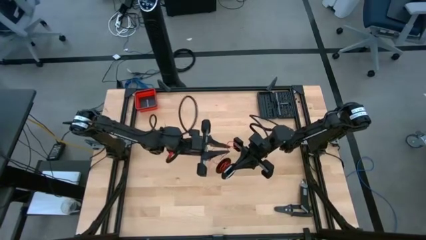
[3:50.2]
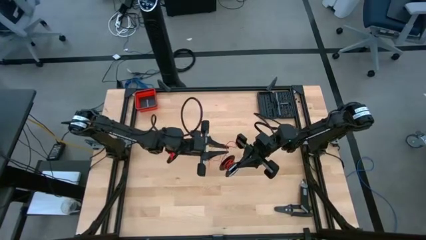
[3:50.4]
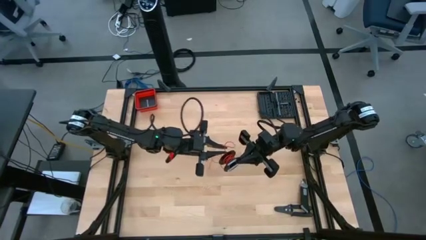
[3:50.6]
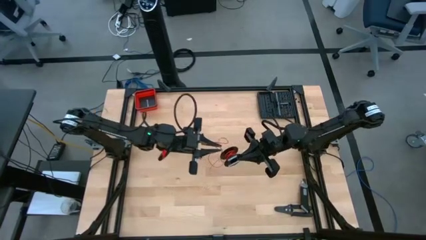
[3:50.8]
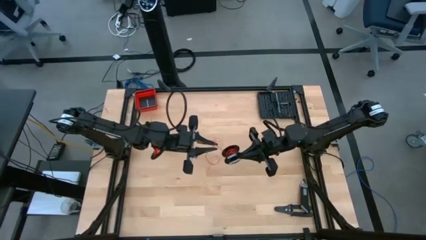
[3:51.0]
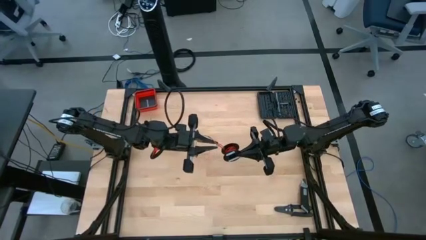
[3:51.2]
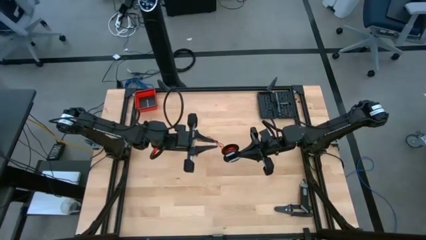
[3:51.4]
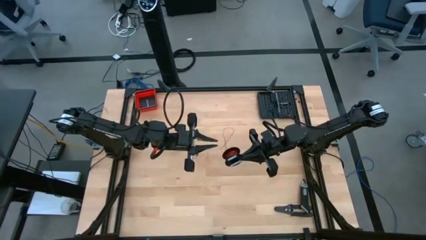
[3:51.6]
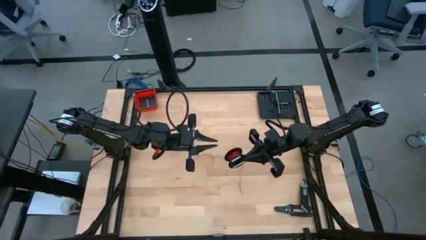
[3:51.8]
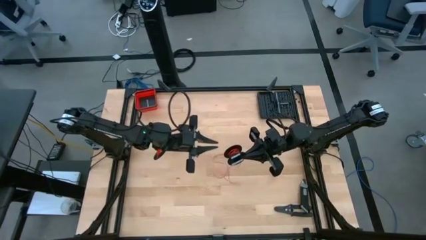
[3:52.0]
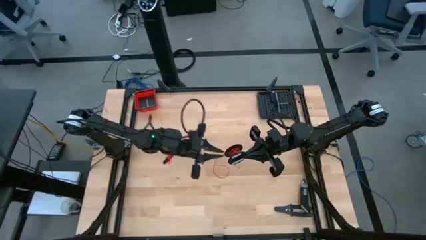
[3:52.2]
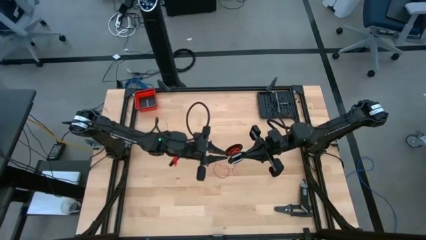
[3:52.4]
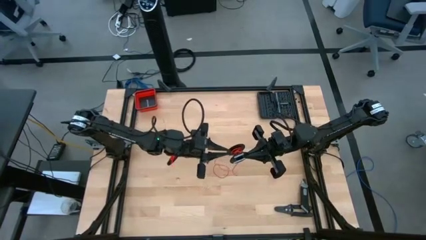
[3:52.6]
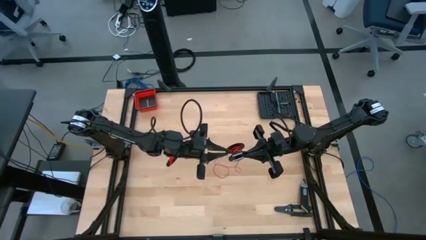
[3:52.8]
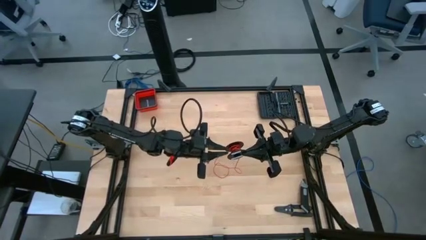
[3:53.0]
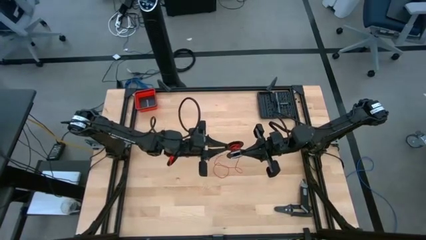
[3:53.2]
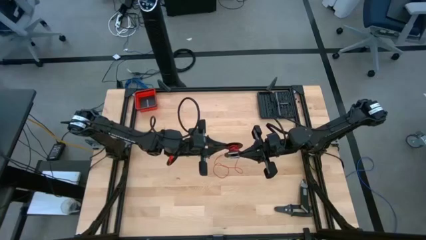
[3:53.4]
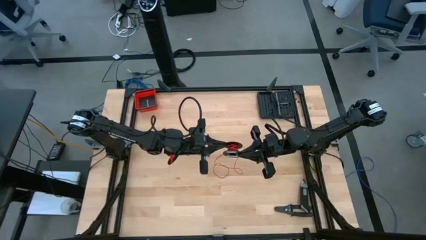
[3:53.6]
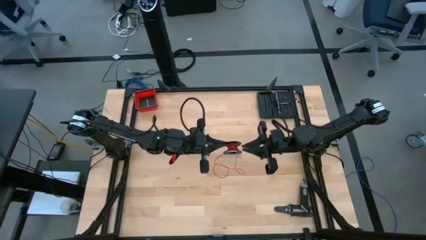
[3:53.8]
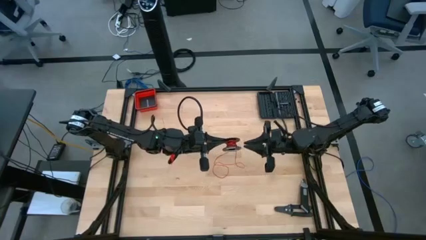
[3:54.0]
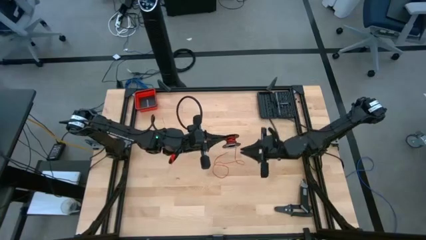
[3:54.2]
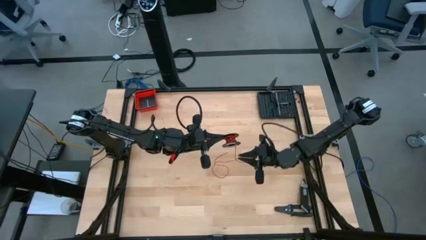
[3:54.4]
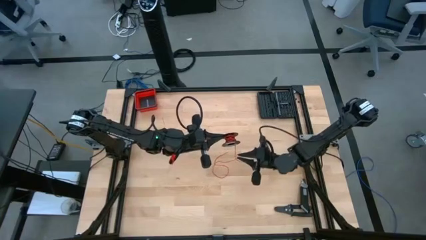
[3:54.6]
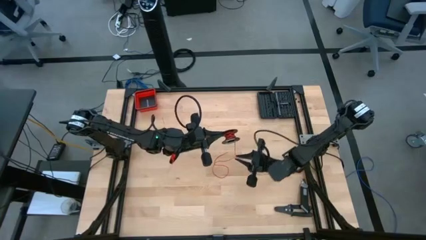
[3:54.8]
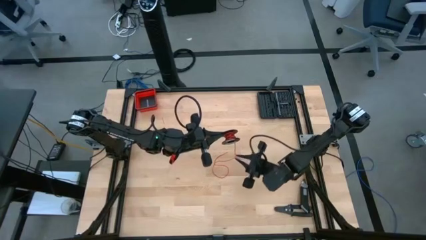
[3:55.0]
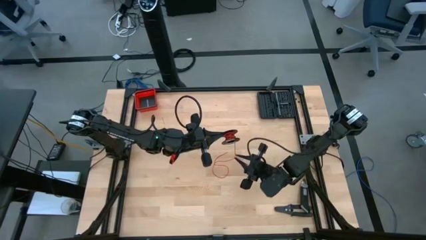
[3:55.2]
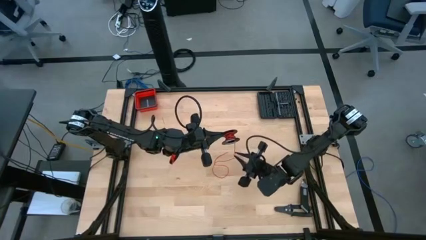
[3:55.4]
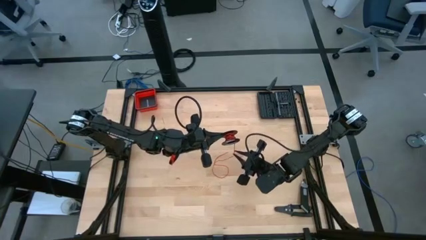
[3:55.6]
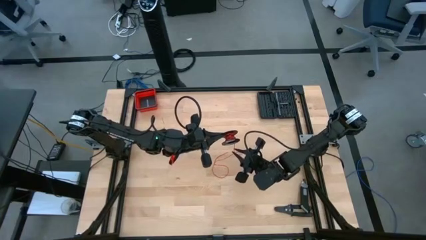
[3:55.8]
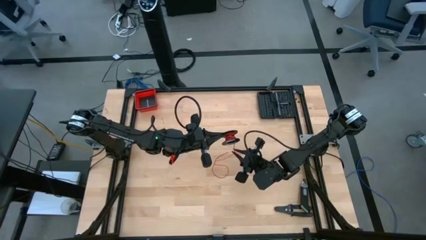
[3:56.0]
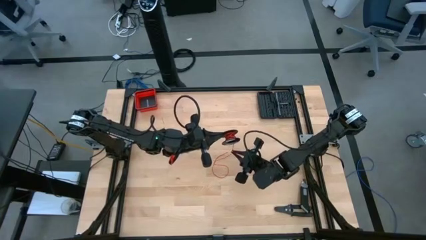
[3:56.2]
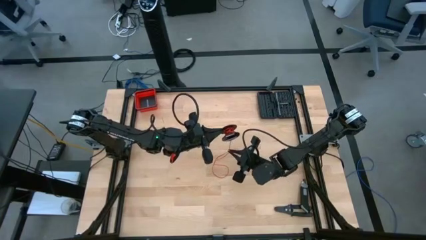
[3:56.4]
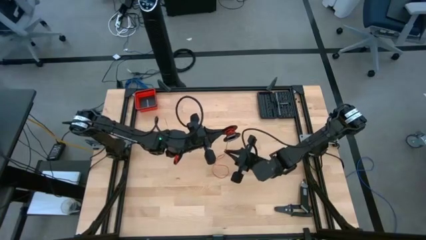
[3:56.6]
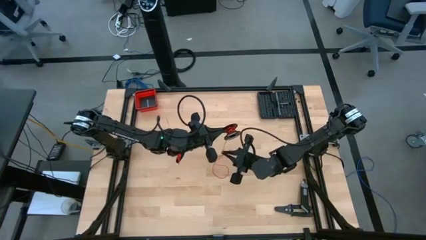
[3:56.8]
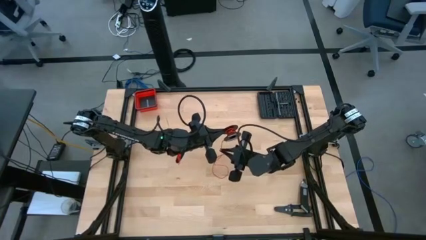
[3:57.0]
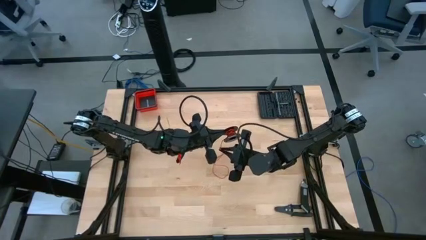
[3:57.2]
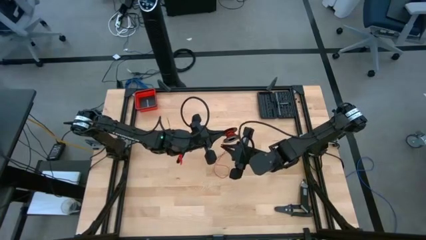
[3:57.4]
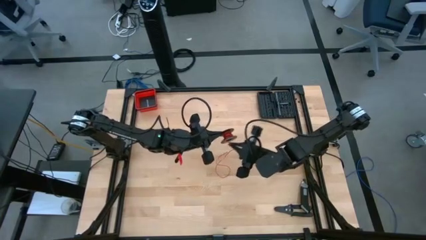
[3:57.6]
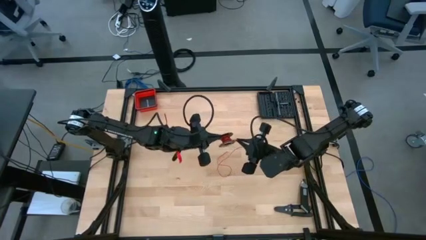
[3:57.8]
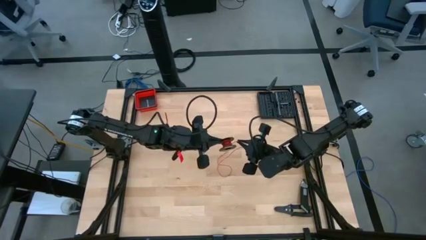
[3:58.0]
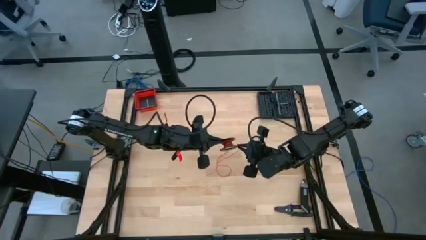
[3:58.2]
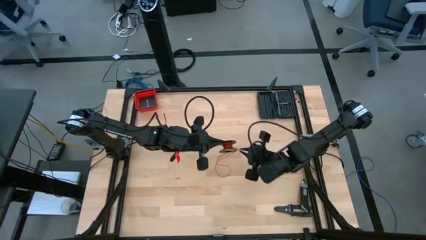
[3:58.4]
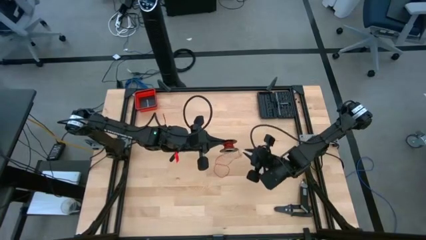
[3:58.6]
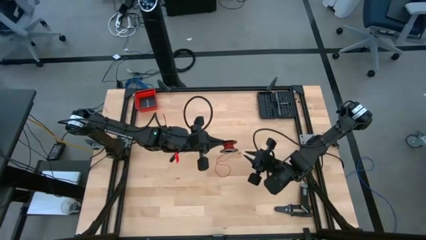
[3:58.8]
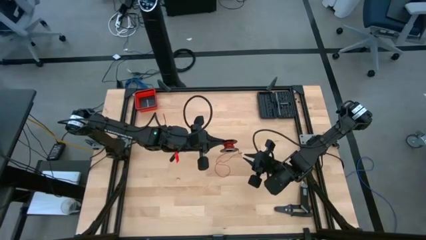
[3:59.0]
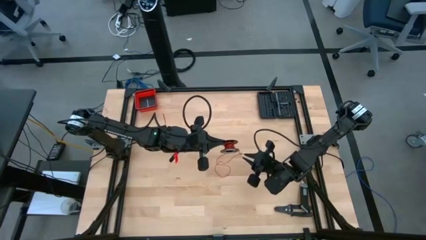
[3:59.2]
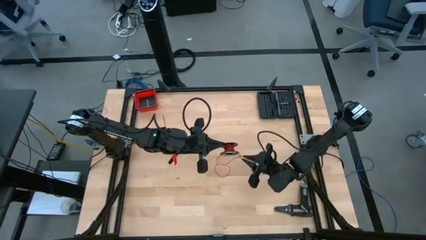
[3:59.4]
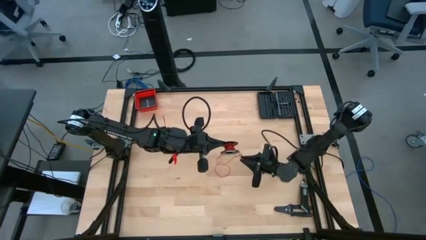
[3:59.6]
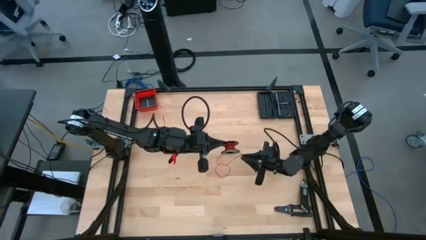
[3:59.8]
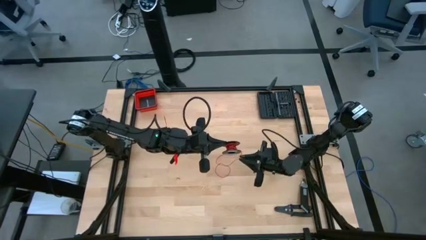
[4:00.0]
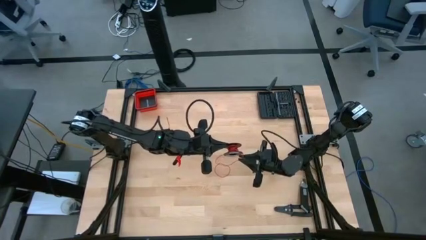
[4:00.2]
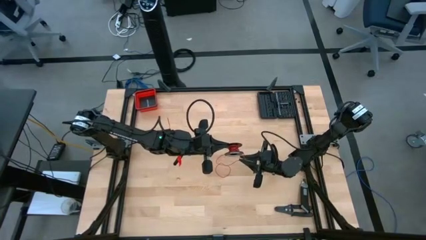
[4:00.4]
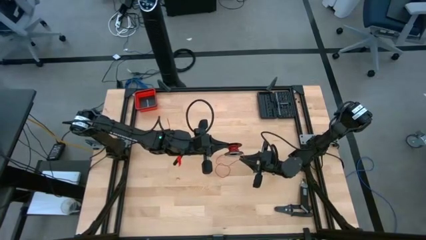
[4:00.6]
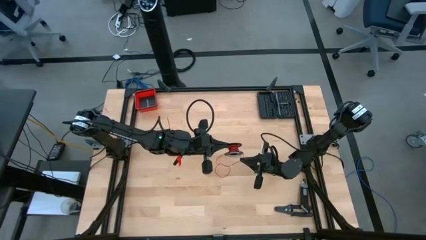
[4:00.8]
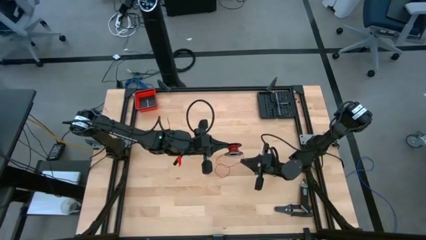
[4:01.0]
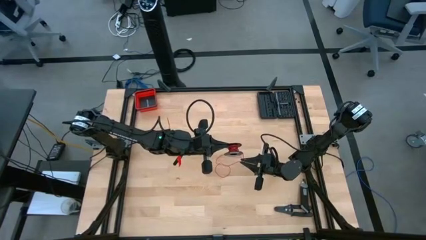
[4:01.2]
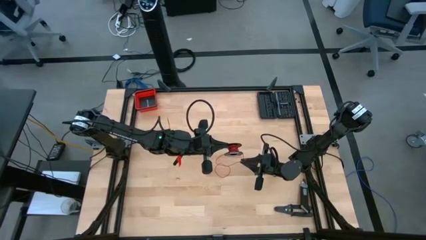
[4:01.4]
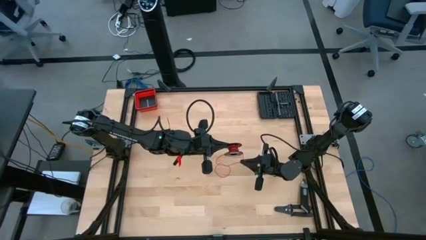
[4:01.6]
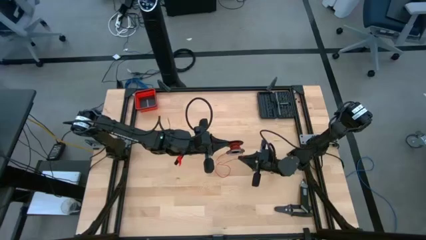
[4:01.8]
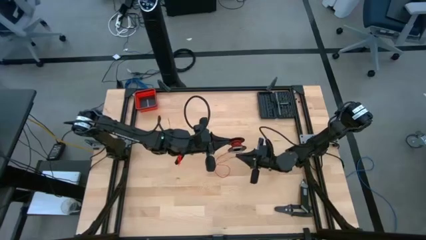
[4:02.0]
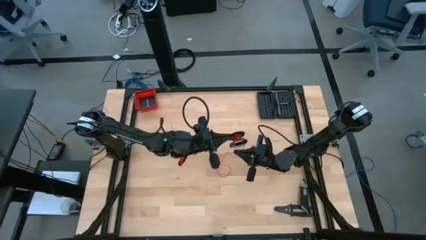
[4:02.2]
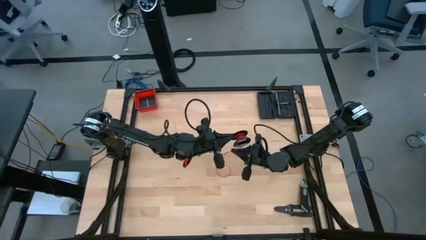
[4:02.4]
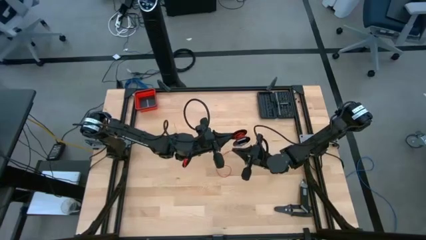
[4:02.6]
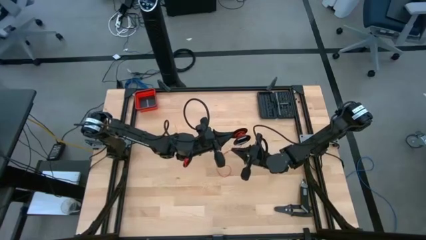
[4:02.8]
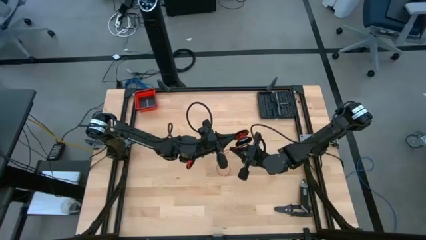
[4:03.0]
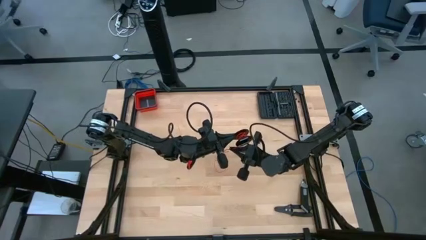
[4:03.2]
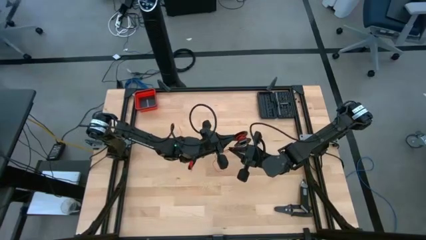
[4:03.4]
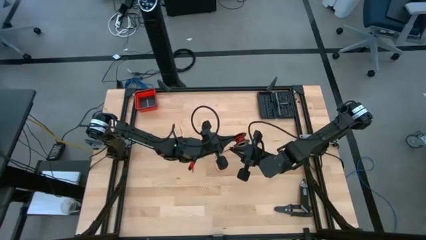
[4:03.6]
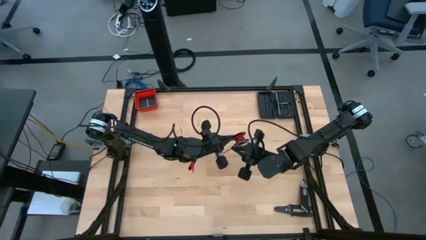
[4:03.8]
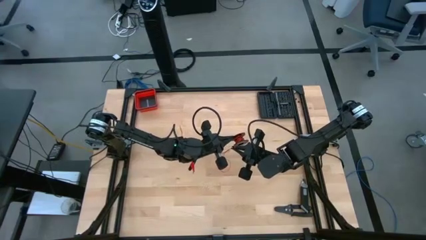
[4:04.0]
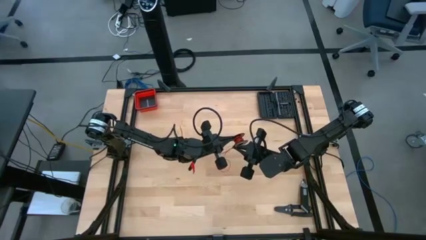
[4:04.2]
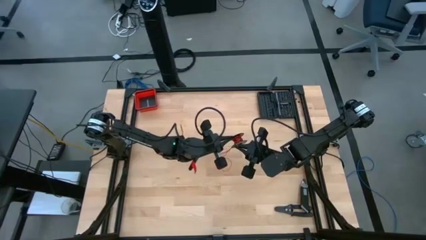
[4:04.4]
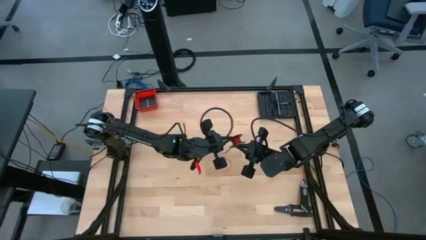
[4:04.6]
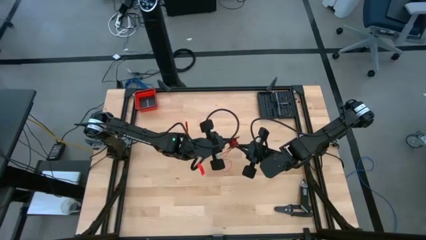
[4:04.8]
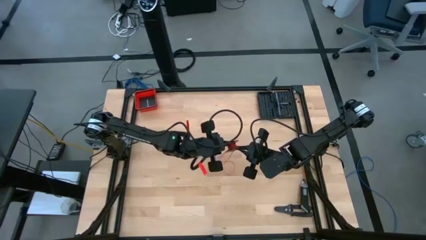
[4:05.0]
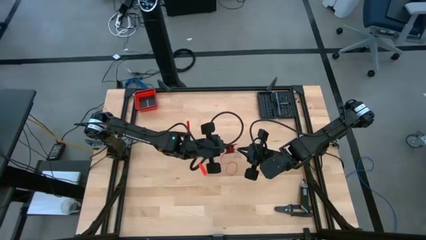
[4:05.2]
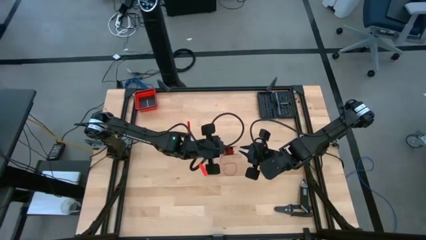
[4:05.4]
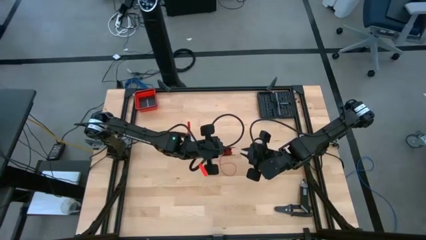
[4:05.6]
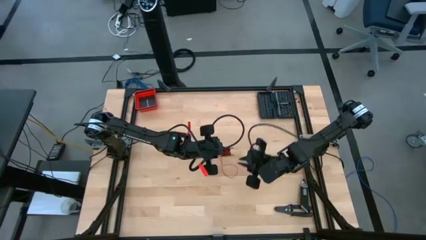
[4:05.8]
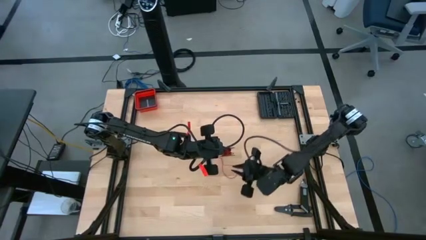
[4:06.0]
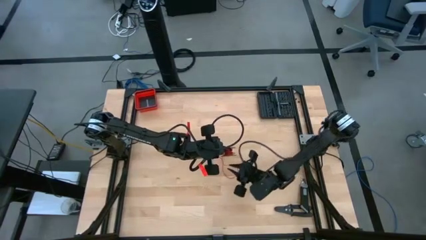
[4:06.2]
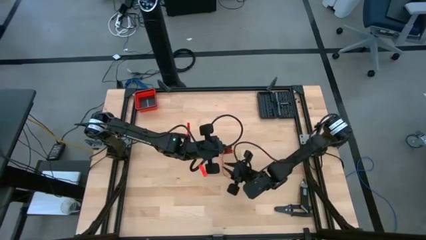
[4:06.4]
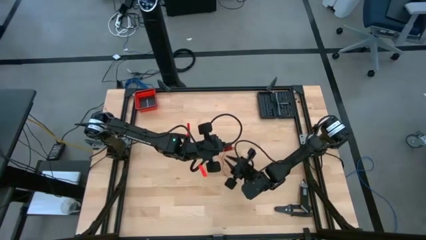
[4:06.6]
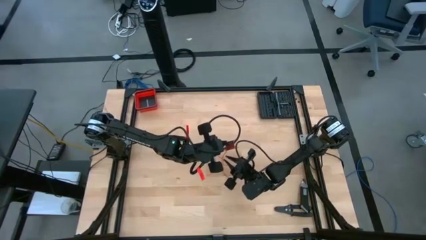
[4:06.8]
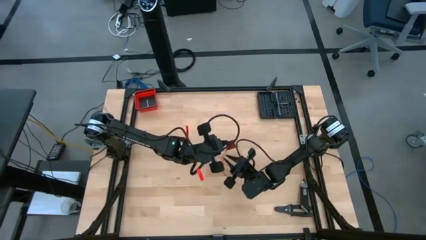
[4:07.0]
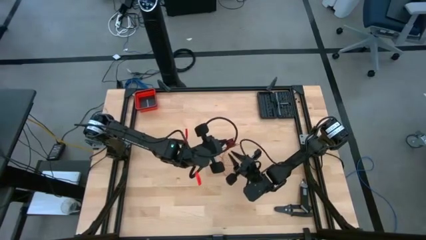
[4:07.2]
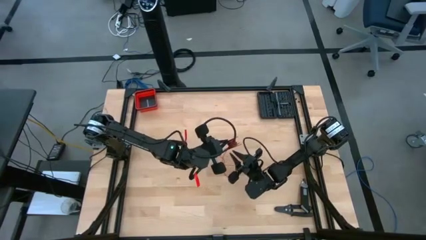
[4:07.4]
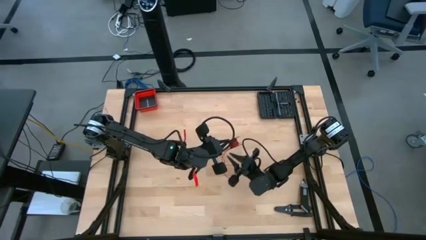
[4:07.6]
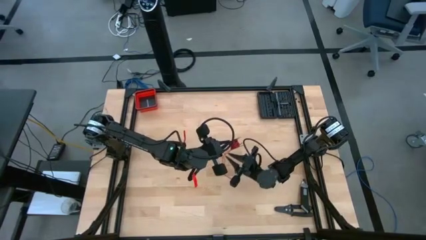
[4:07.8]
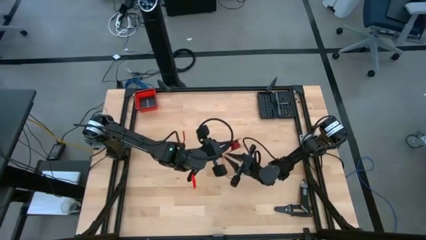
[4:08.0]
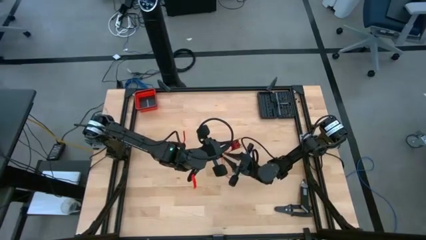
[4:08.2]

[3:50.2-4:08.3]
Task: Coil cords
Coil the red wire onto the spool
